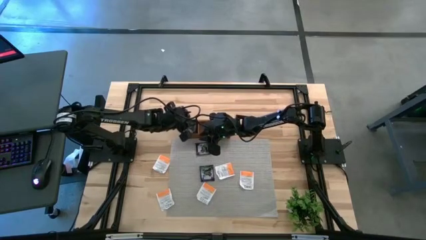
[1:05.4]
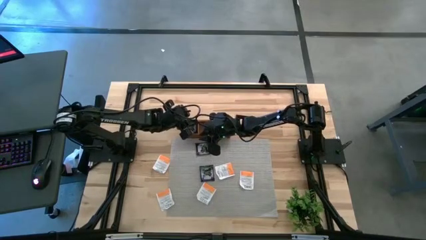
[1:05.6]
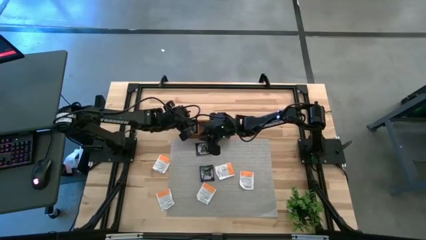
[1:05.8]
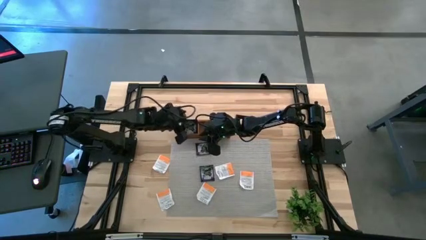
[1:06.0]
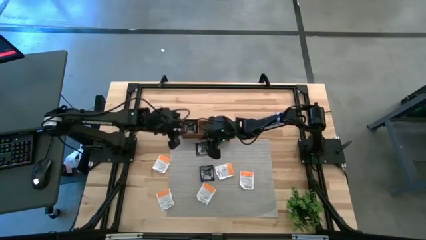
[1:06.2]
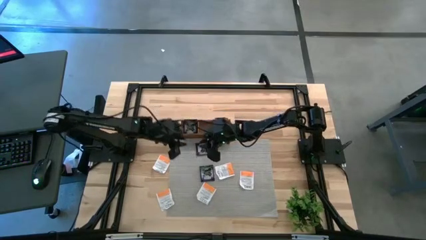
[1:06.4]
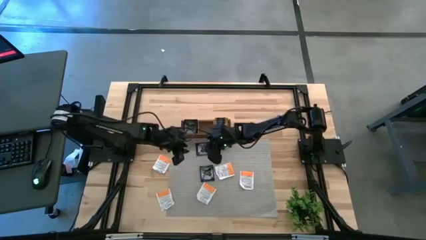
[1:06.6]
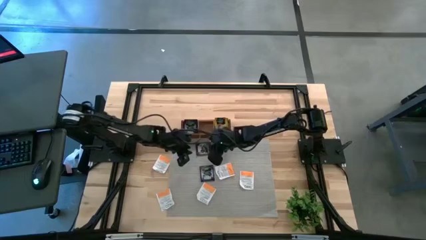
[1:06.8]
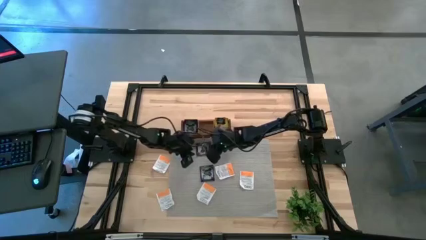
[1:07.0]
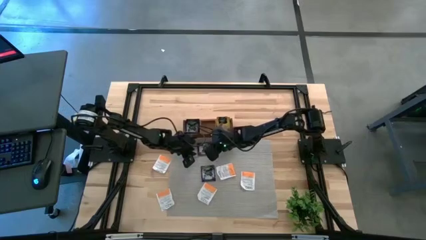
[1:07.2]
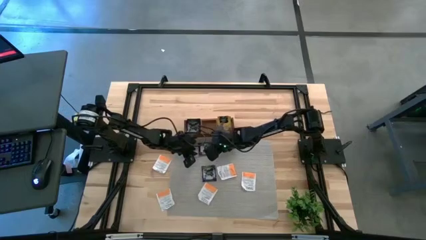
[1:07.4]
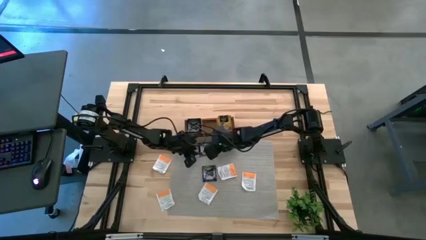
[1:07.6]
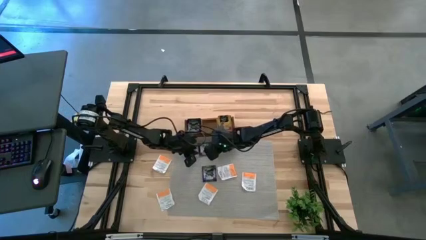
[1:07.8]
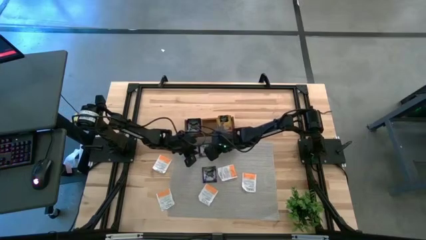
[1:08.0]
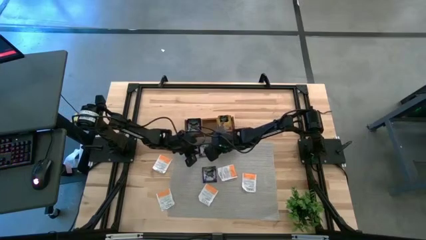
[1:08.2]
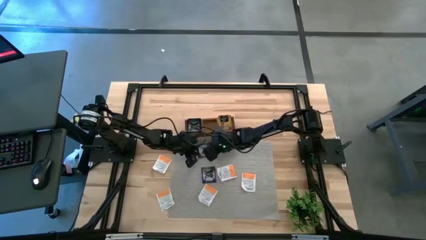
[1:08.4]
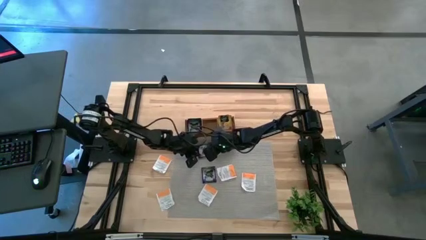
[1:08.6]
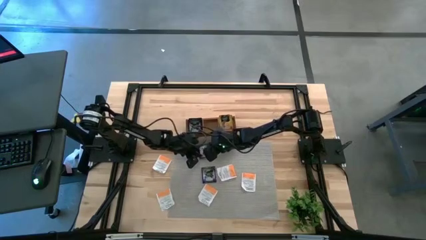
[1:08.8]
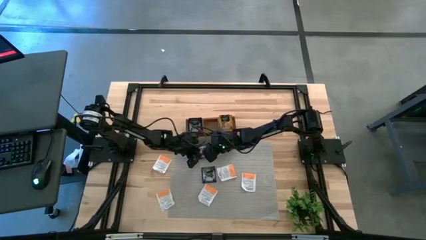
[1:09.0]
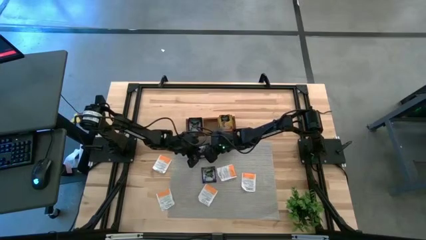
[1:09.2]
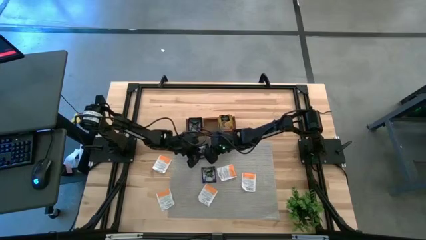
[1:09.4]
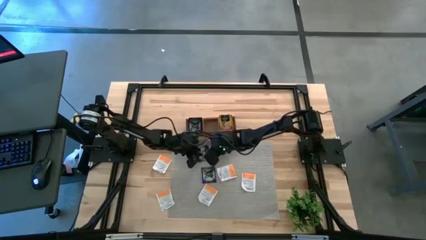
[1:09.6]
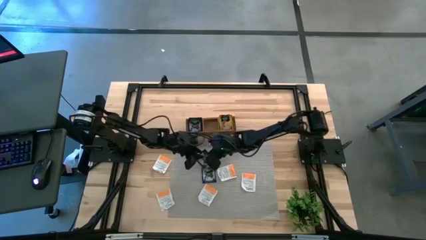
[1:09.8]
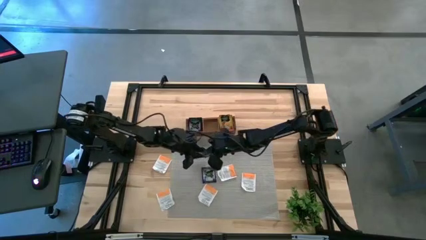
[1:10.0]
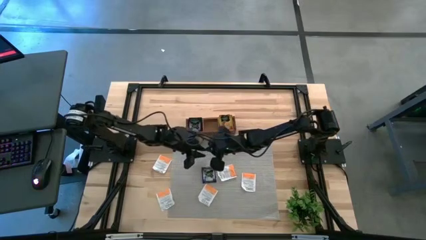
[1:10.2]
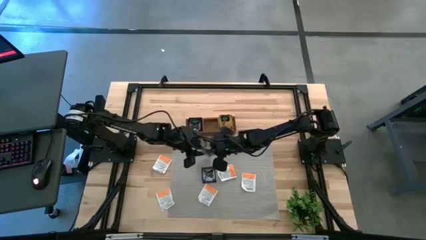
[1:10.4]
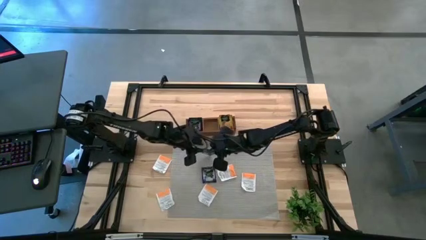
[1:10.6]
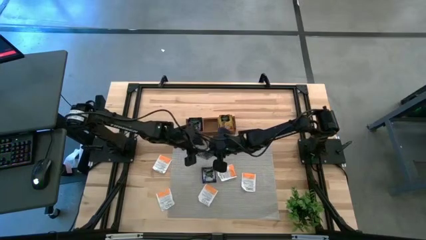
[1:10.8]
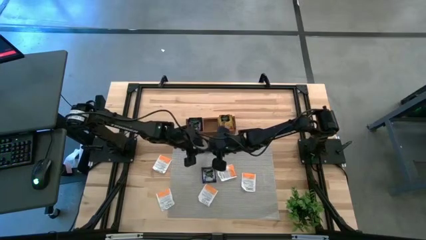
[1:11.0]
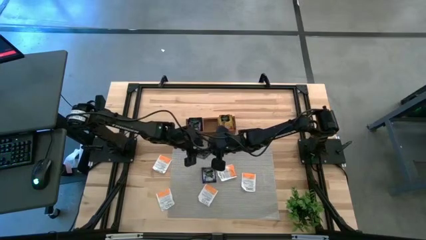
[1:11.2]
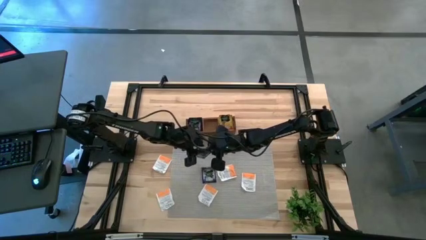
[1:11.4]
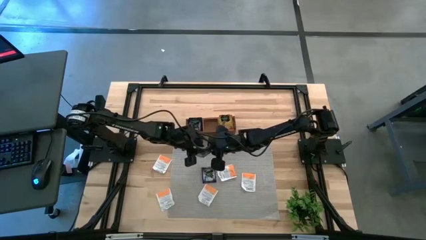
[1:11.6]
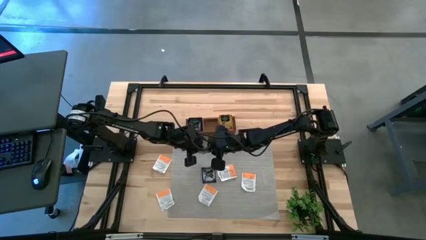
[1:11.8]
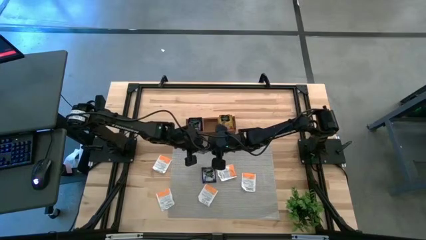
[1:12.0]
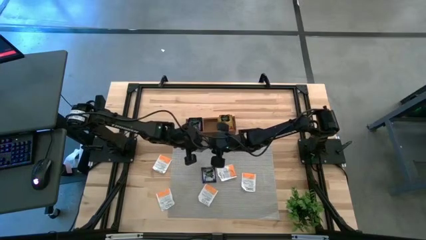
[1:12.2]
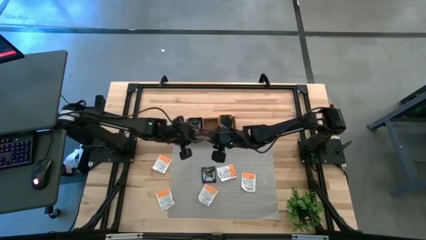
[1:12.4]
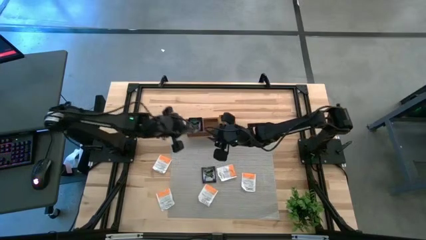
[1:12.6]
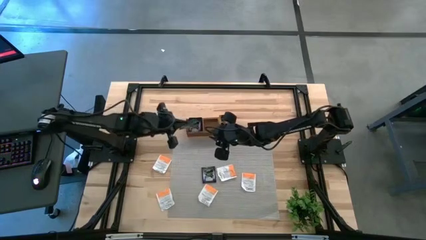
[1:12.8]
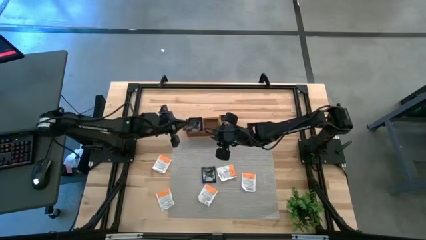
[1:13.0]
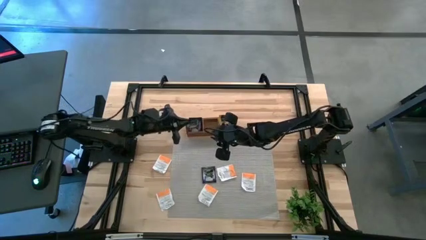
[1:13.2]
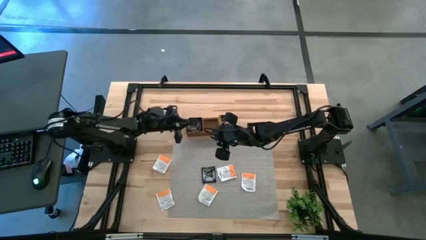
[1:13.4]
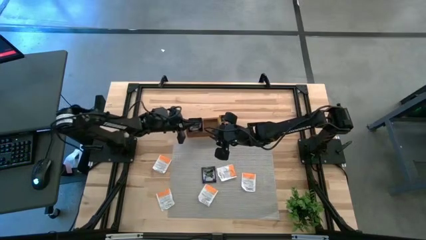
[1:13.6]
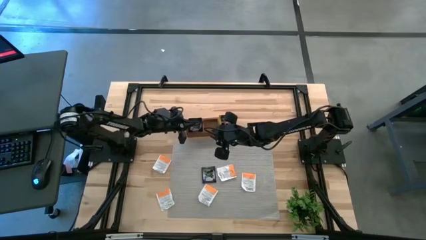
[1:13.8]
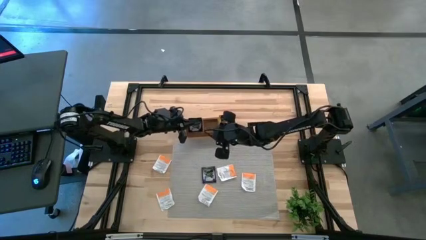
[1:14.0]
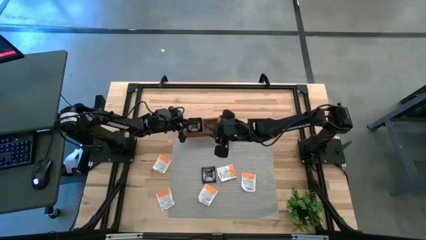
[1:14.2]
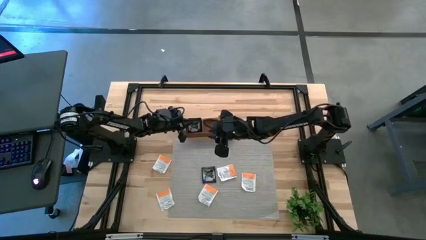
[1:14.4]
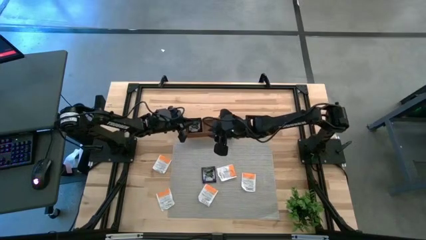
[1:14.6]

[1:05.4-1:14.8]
Task: Pick & Place Tea
Put the violet tea bag into the left section of the wooden organizer

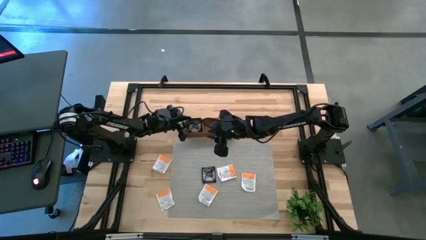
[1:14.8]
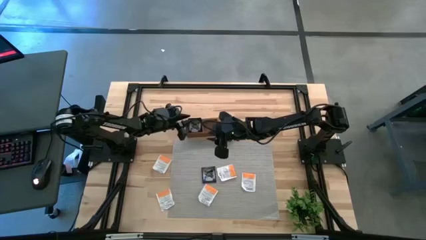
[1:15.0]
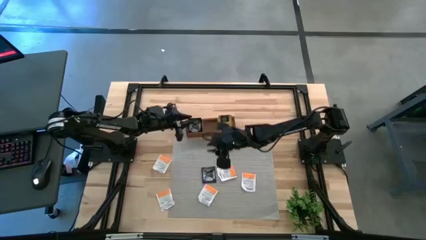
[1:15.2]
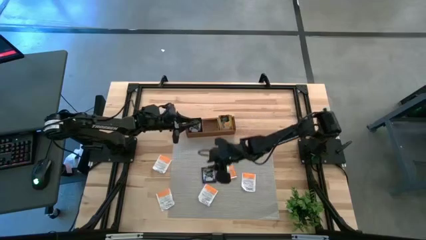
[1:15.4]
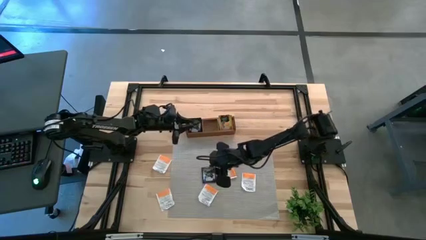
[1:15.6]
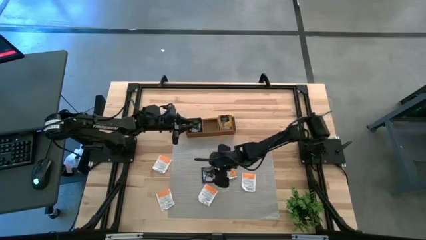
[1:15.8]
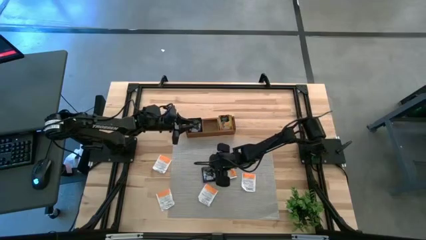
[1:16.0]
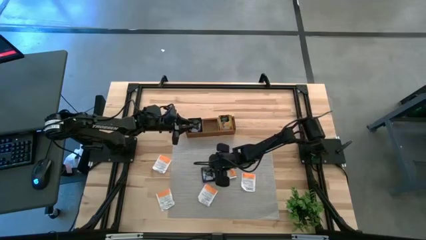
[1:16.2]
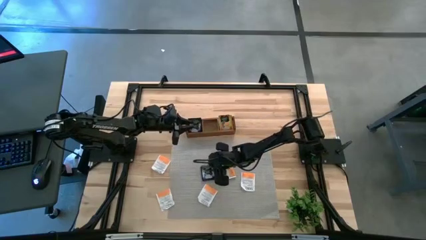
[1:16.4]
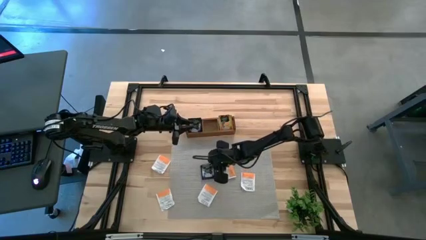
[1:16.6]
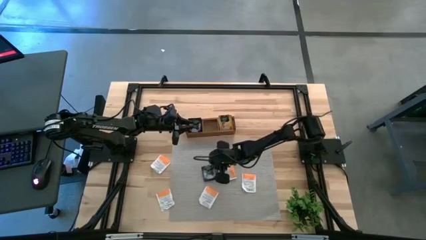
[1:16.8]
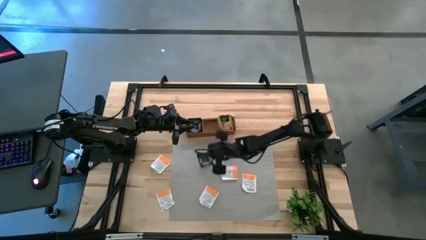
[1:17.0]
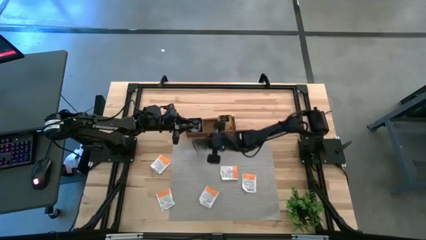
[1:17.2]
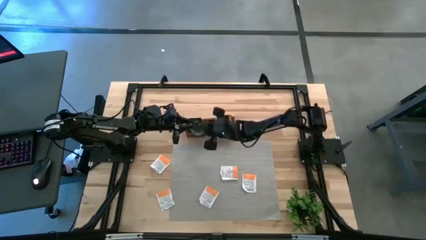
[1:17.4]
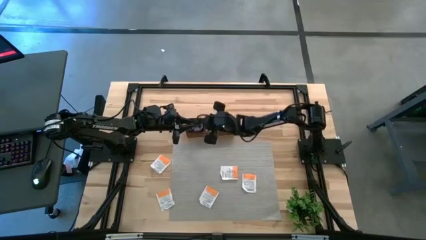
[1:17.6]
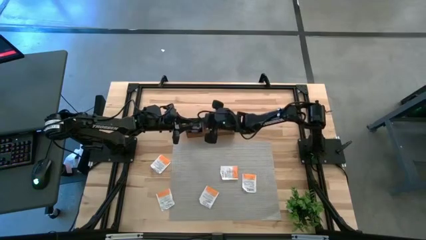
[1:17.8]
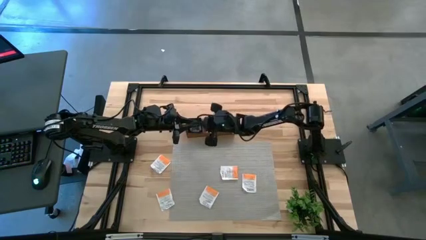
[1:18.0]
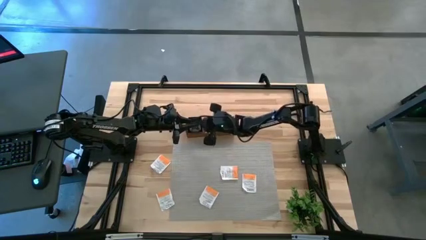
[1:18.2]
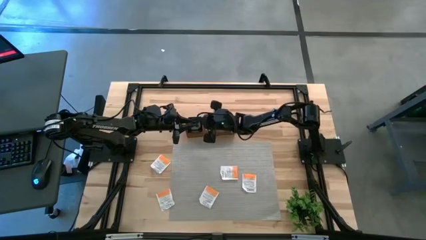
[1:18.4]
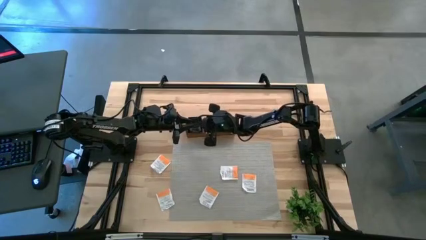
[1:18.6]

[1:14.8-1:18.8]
Put the violet tea bag into the left section of the wooden organizer

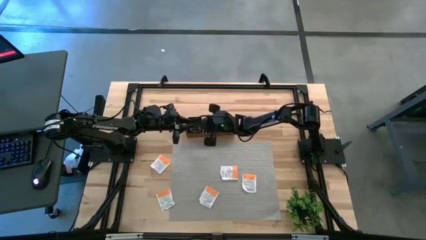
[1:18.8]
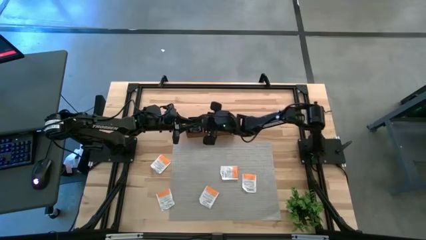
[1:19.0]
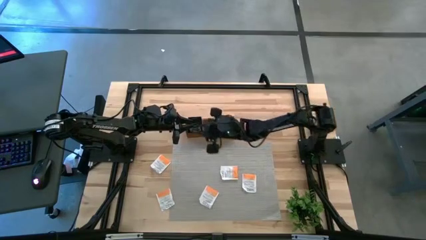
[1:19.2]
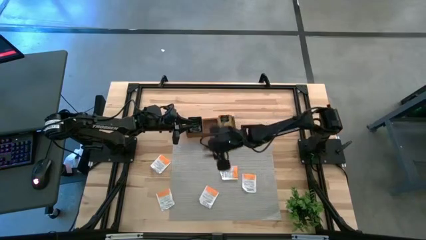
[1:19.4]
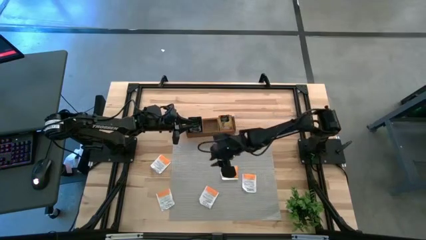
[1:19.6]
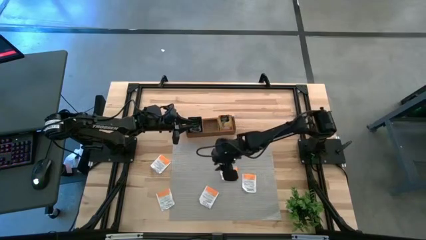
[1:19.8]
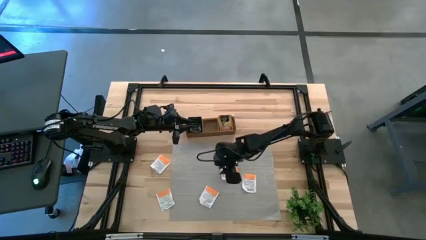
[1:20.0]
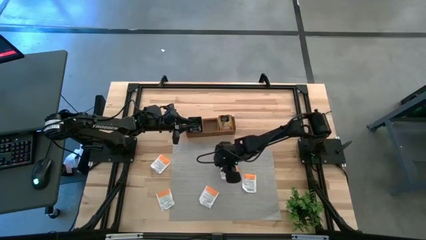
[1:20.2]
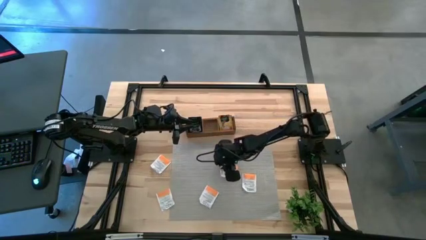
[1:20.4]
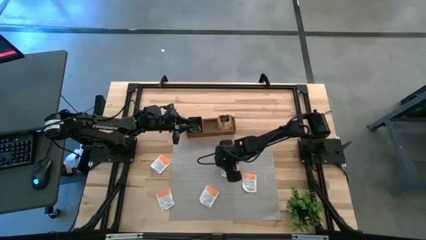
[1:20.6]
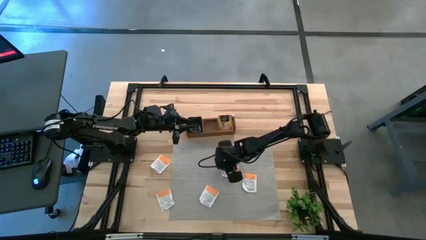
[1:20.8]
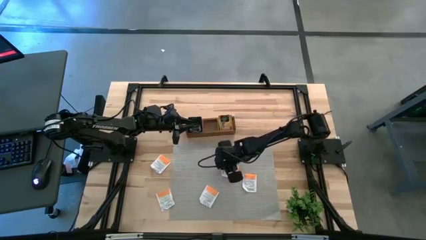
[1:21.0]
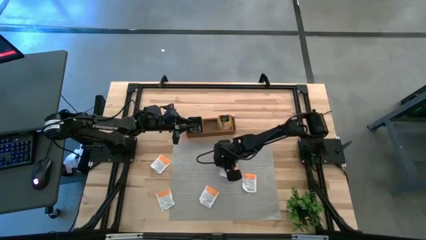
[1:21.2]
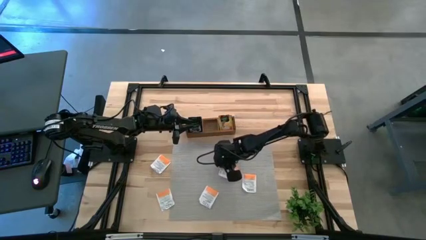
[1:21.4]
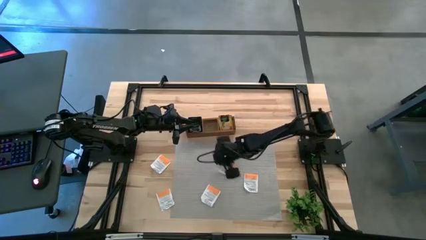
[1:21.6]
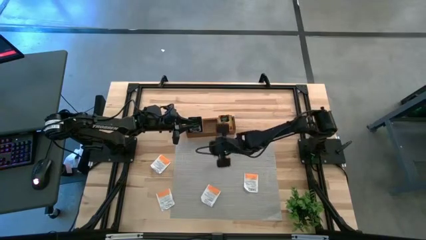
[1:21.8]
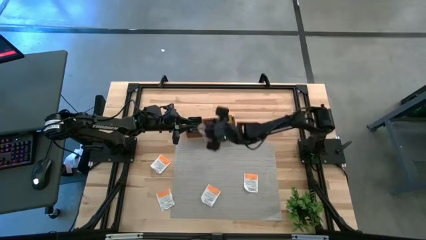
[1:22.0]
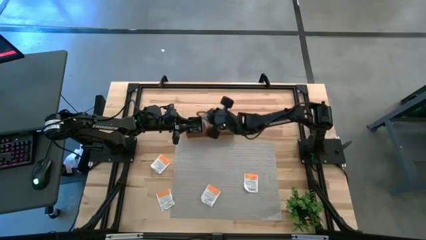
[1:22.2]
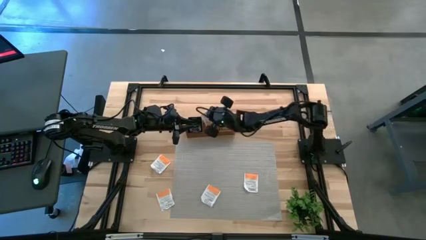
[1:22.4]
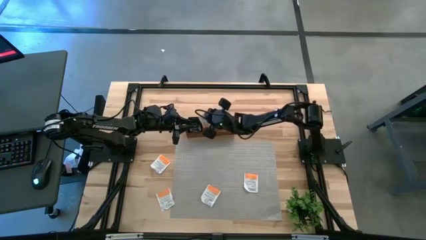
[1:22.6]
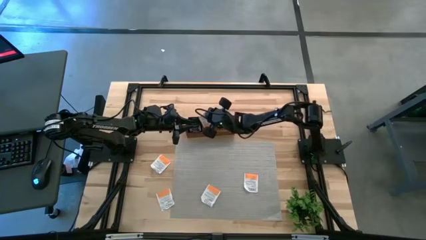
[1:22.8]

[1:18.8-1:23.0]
Put the white tea bag into the middle section of the wooden organizer
